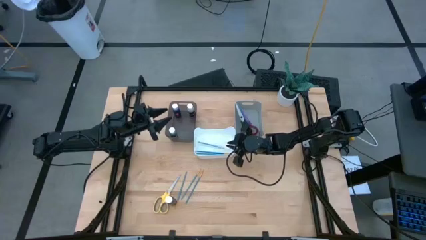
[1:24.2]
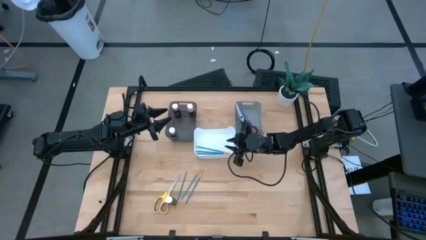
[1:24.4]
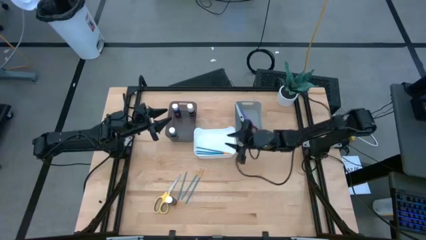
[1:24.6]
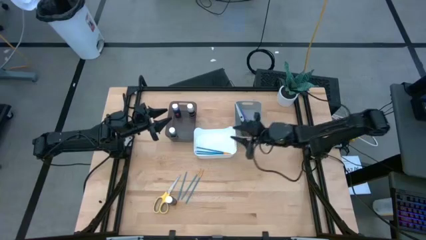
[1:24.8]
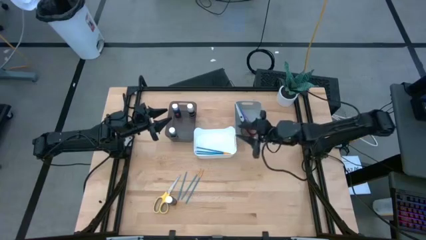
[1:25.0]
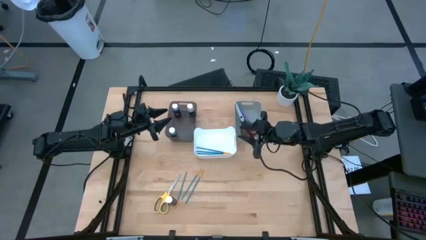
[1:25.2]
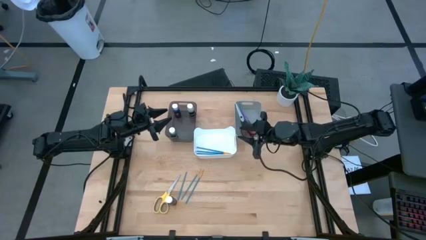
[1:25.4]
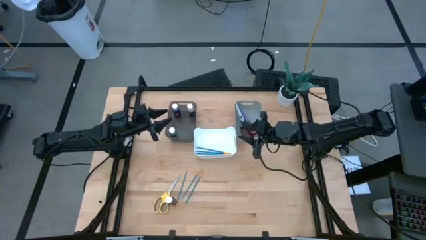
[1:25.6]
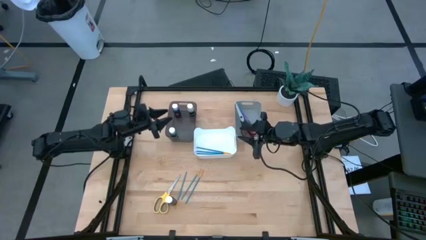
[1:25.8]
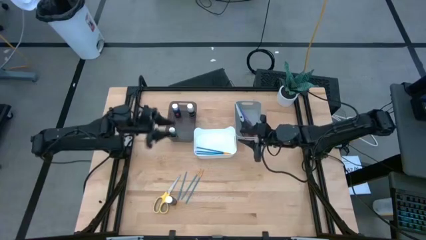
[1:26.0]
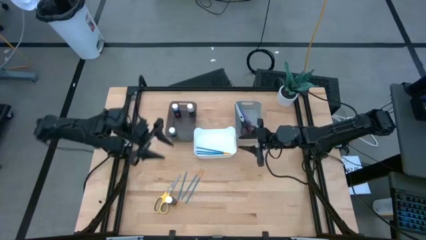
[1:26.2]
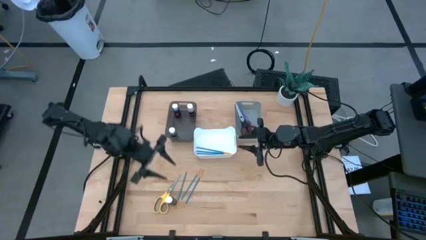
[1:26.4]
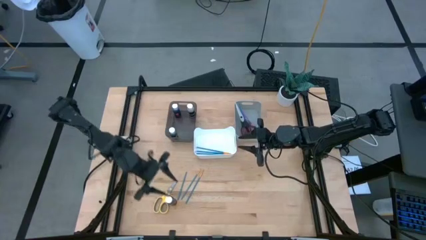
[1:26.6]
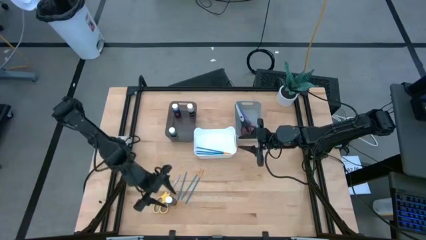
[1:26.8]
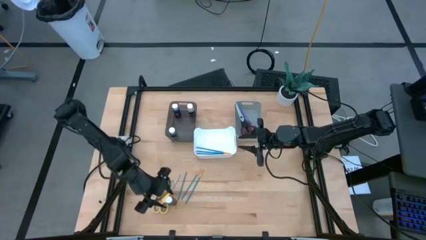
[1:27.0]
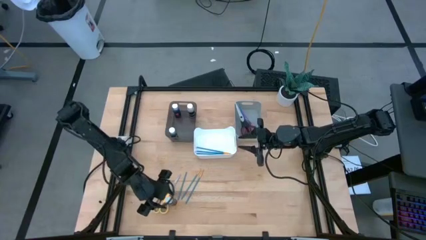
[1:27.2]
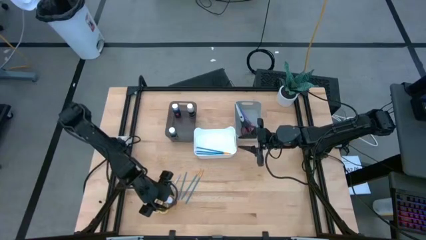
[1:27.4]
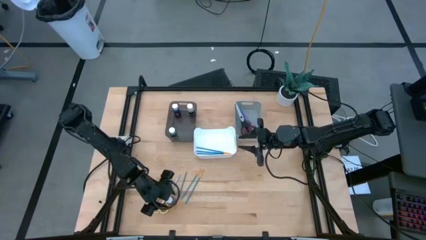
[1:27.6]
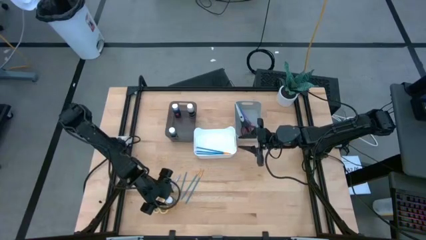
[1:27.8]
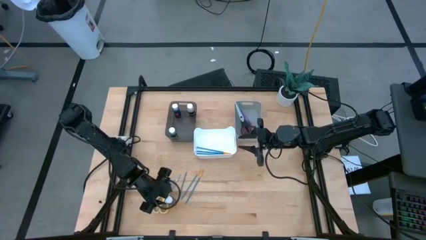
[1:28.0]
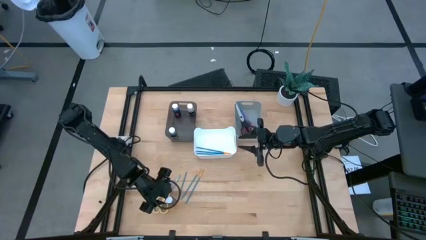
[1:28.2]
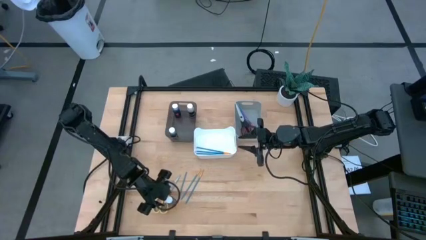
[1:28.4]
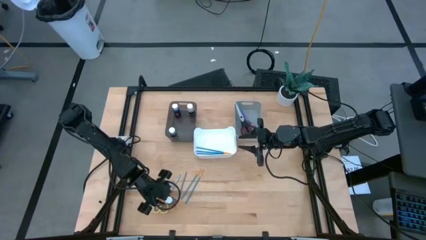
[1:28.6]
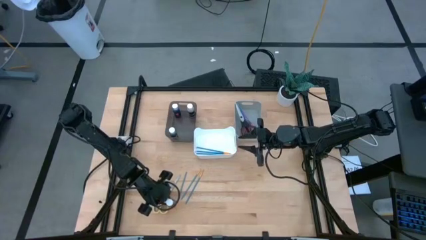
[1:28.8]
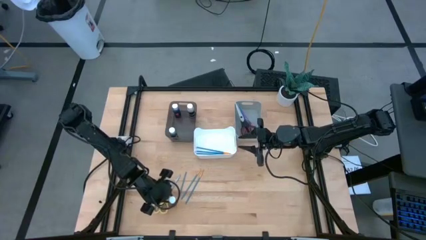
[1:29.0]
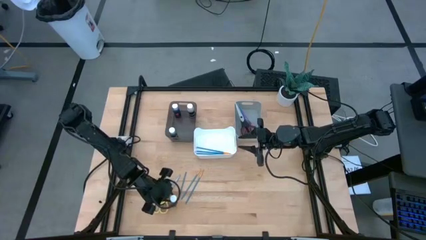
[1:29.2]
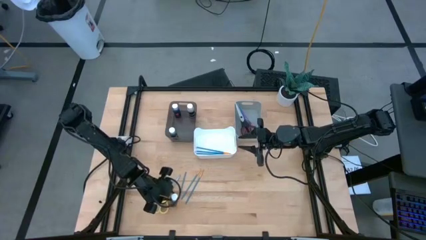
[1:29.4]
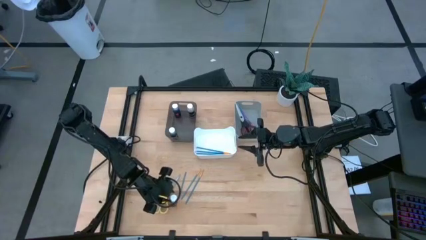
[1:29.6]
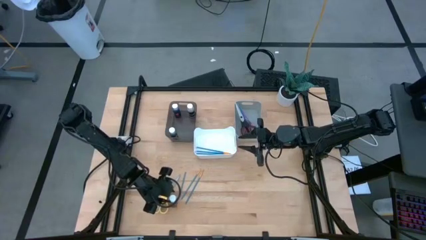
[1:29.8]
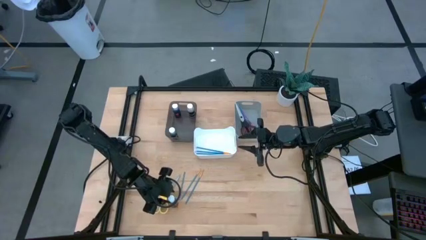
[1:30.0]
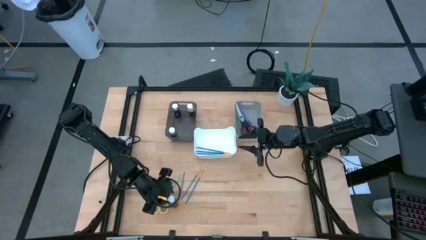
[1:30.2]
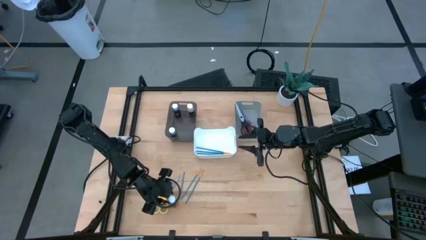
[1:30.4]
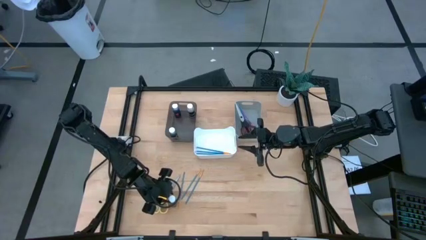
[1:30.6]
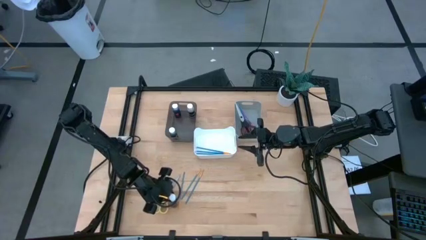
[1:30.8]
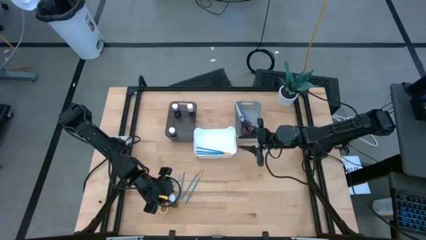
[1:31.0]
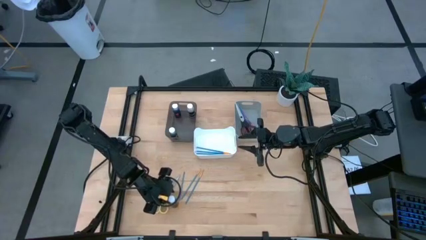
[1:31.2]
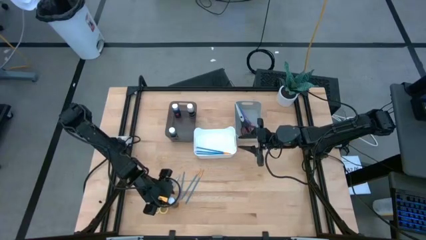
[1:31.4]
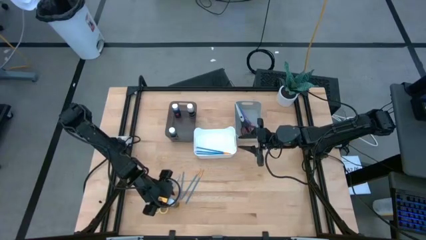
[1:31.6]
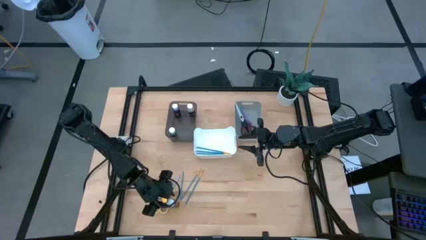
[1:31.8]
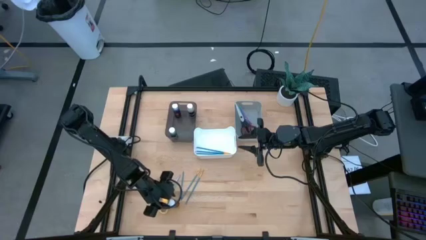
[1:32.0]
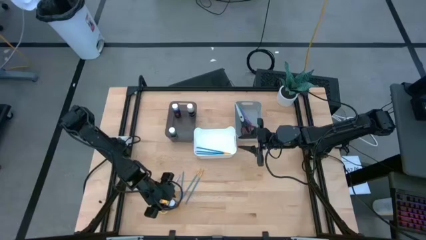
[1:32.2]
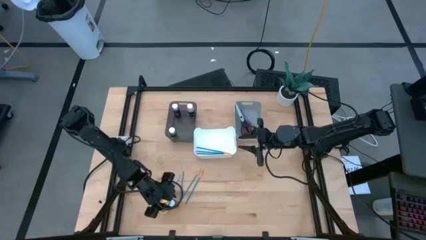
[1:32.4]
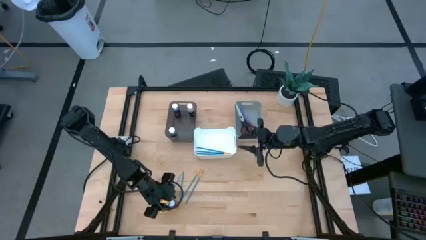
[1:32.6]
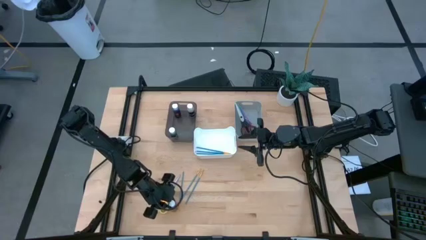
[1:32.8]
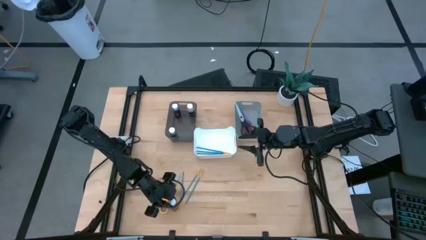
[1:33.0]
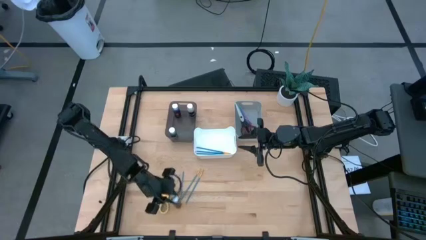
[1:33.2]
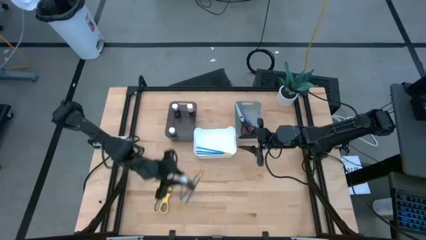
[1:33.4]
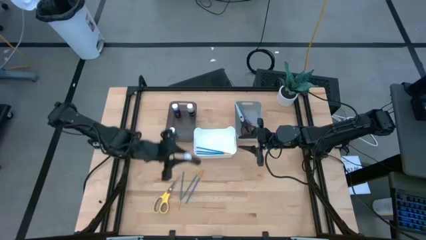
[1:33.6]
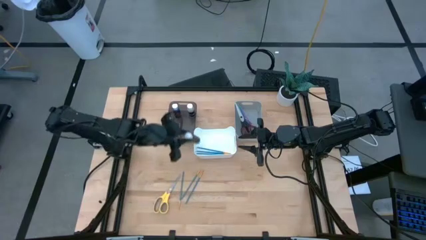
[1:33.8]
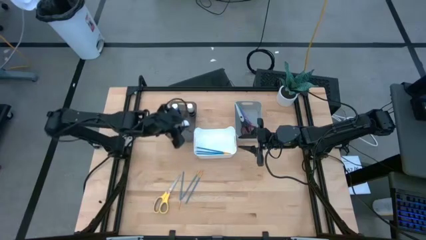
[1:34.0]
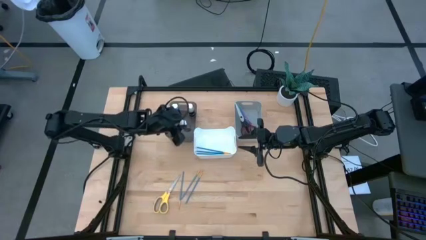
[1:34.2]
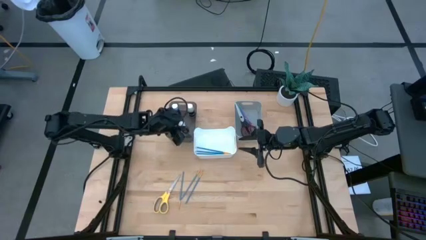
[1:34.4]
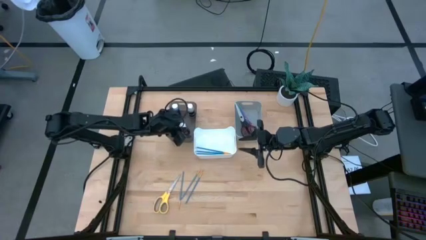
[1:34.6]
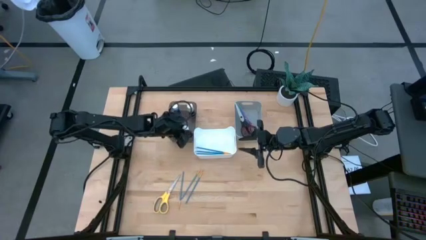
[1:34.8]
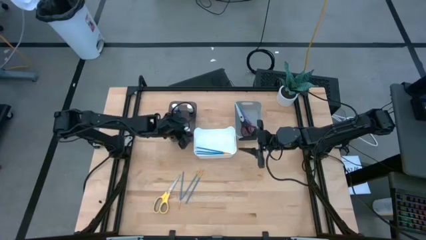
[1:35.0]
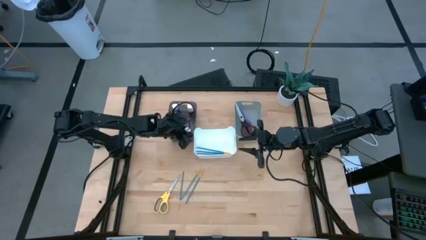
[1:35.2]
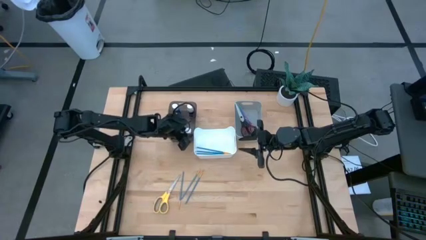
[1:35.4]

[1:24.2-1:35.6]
Task: Pick & Place Paint Supplies
Put the black paint bottle into the black bin
